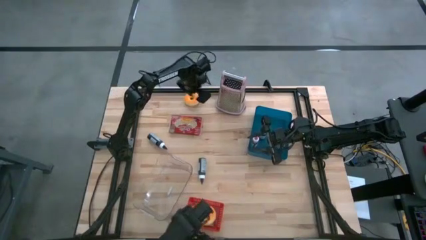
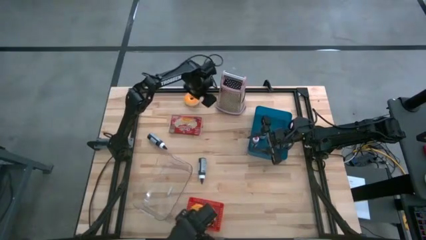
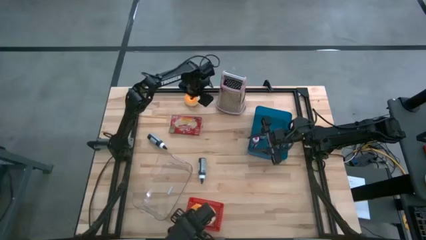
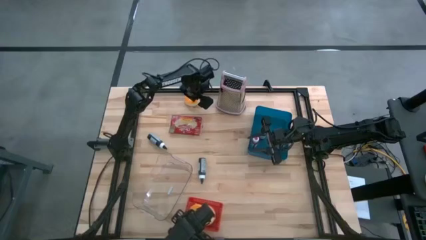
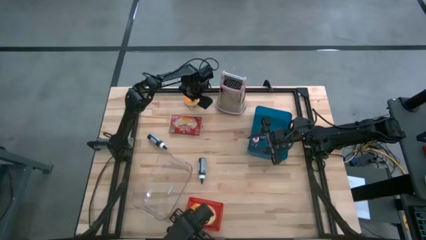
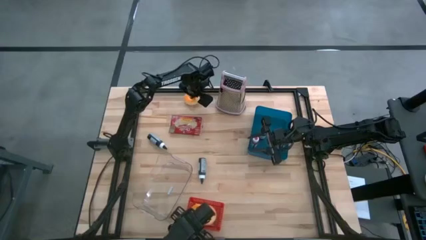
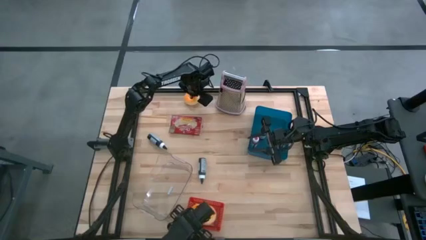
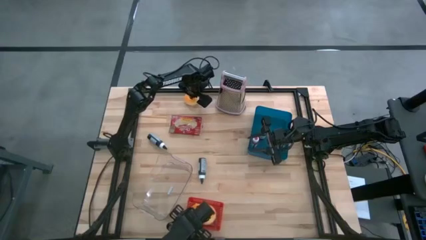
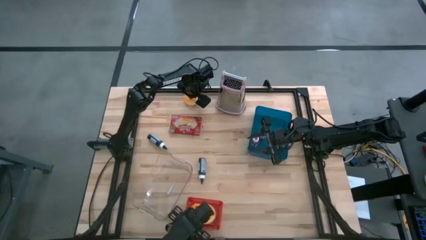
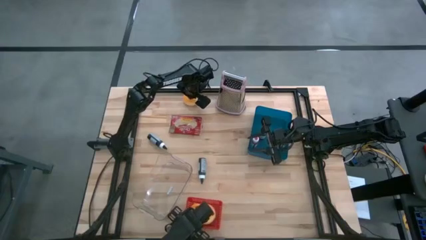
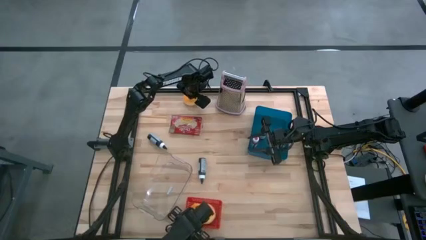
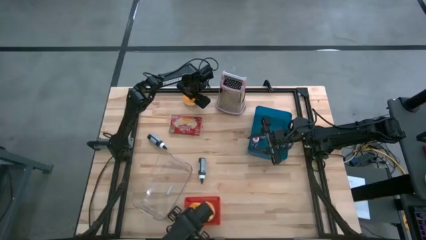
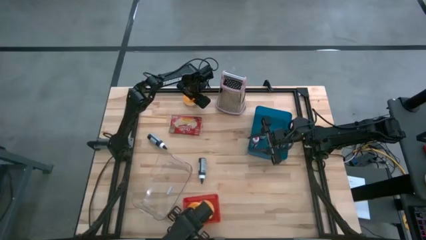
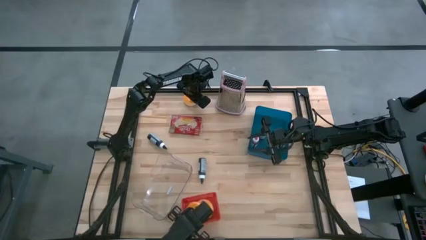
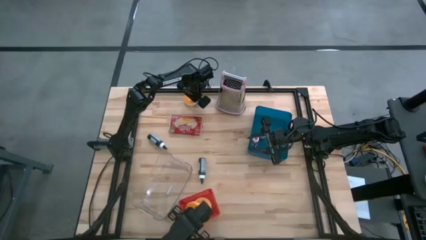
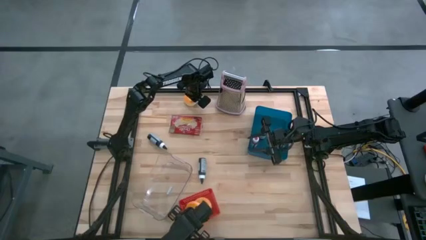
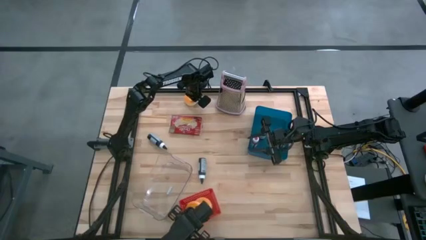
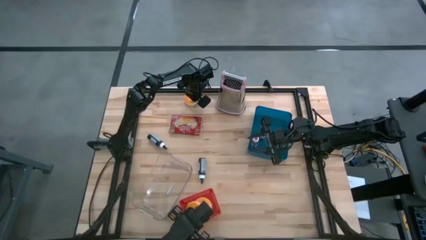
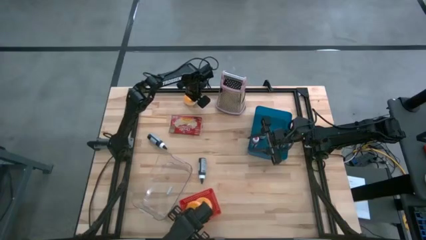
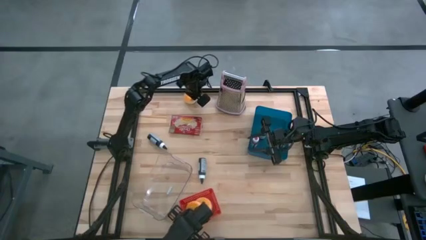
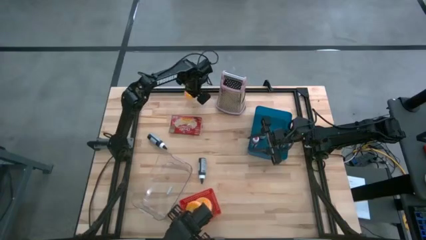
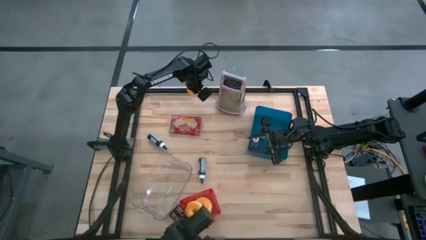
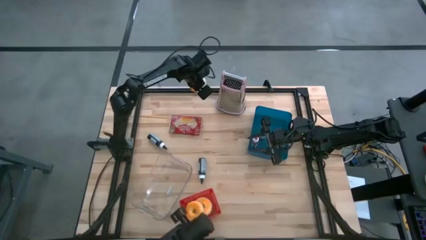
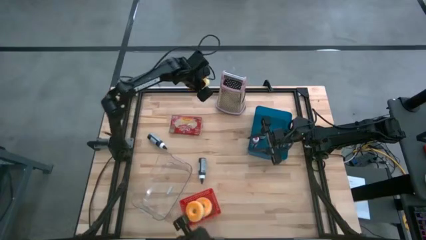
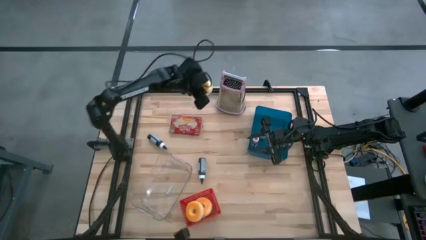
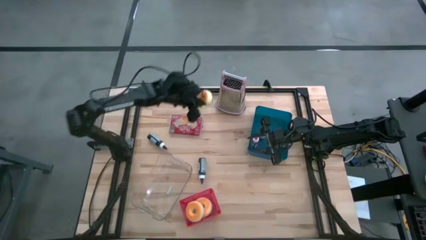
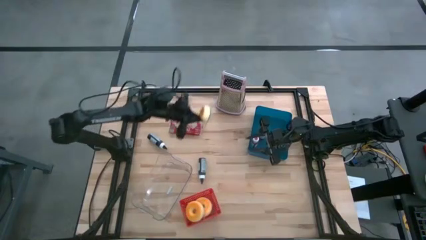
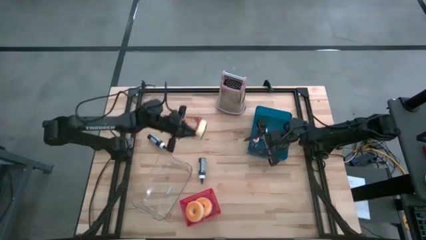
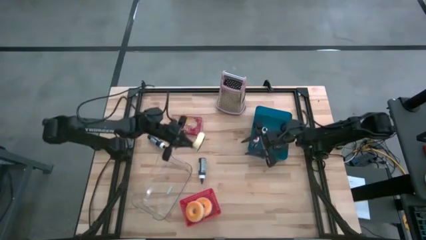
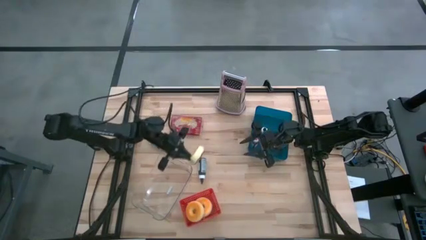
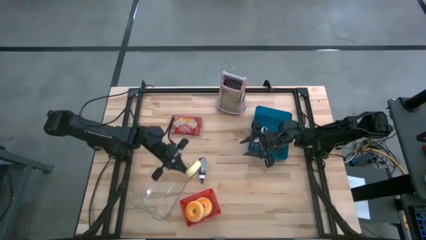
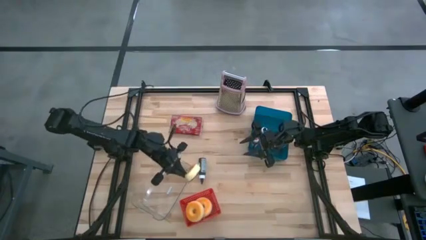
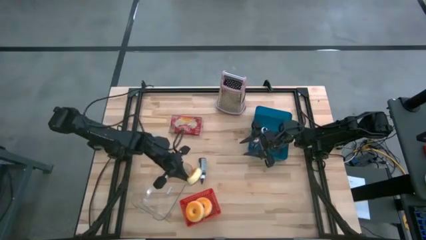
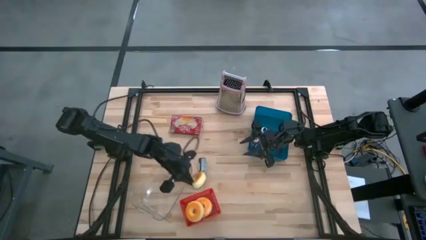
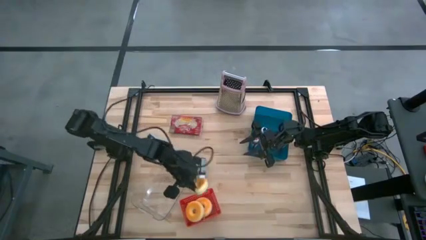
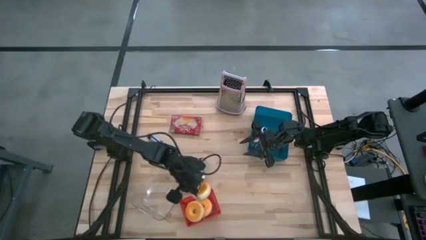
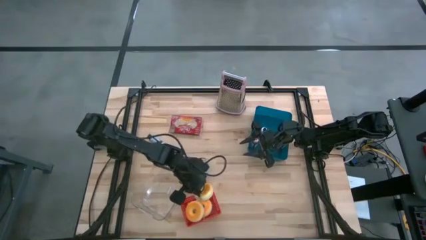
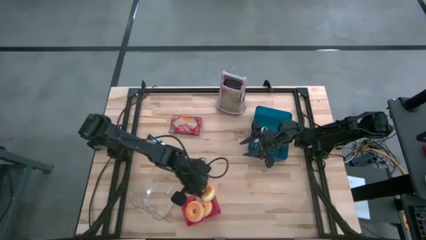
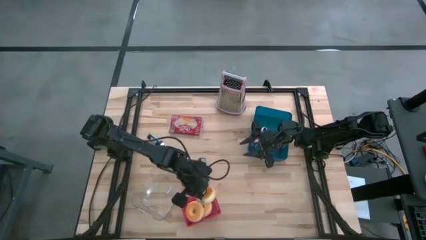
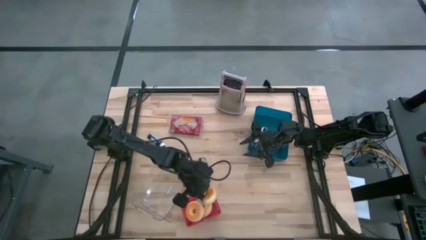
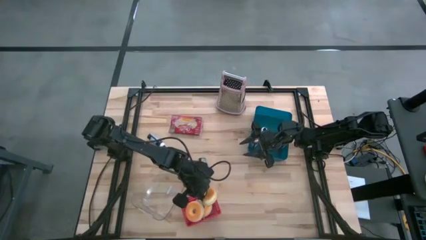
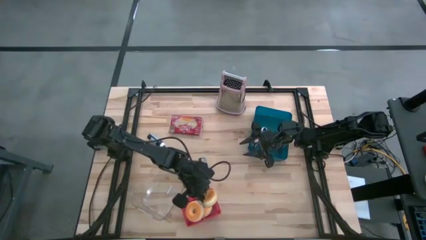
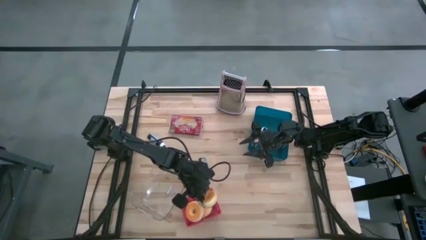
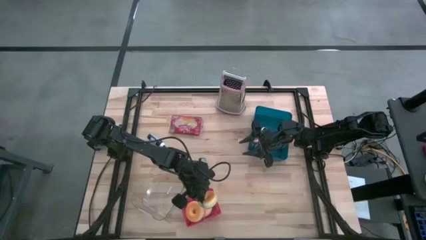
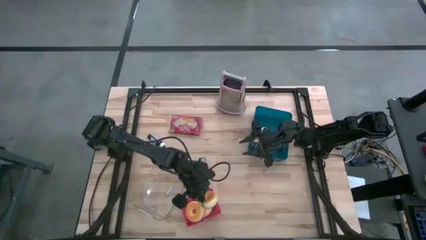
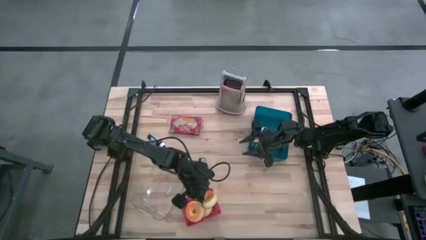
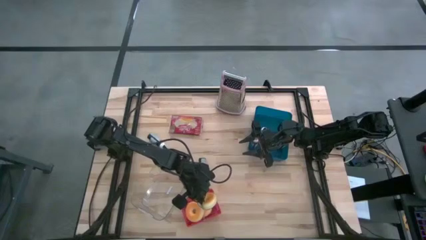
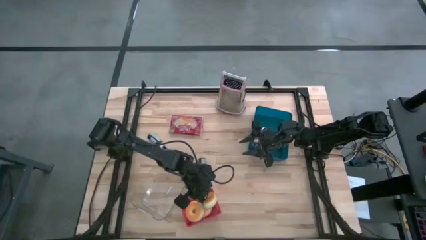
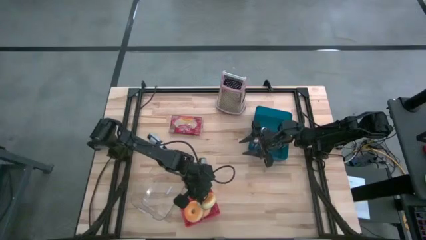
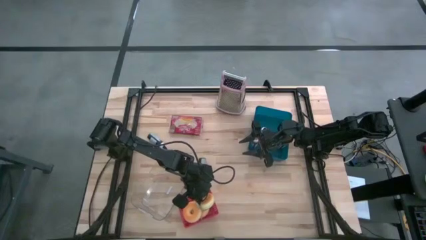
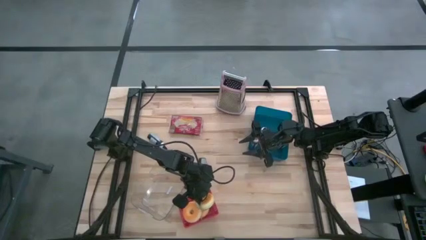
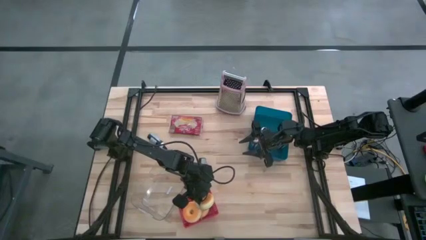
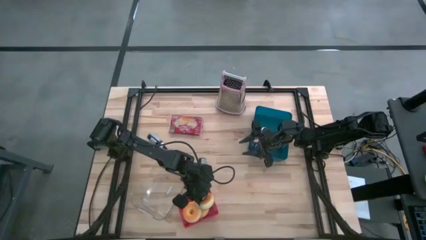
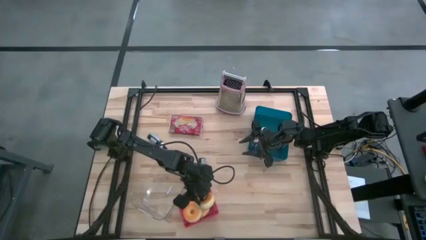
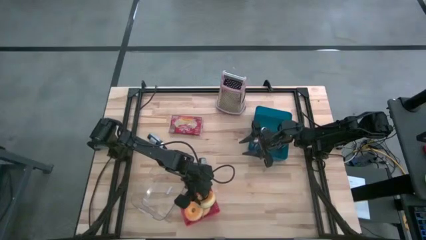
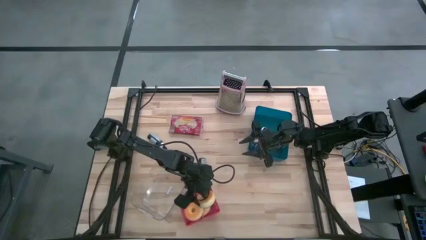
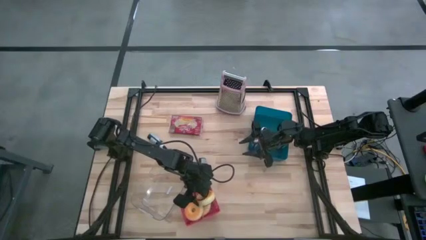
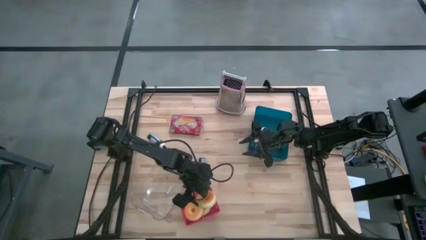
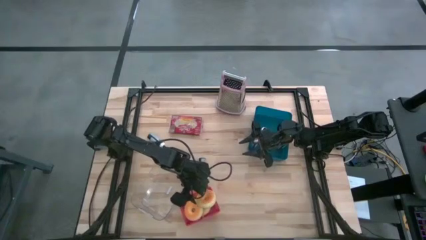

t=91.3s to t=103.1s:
Task: Pick & Place Food Item
Put the orange donut into the red bin

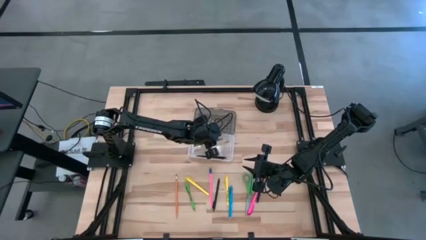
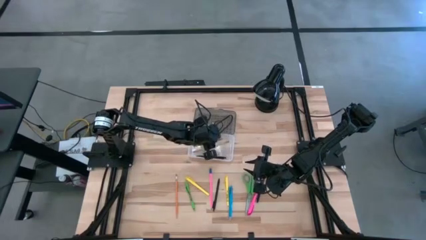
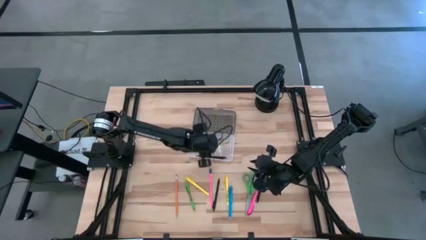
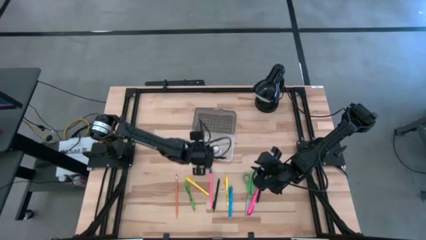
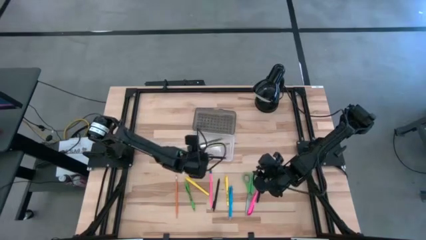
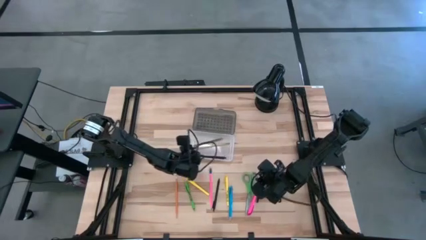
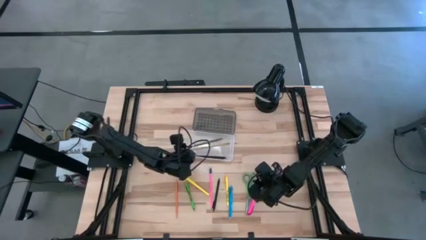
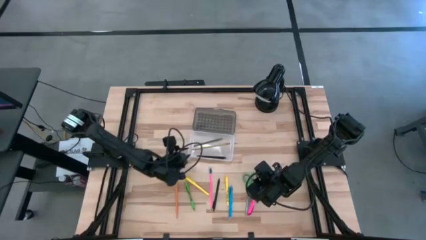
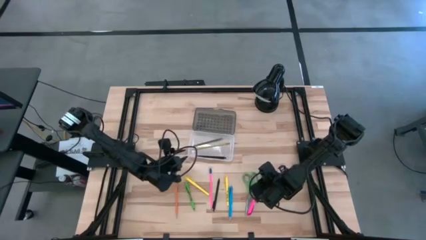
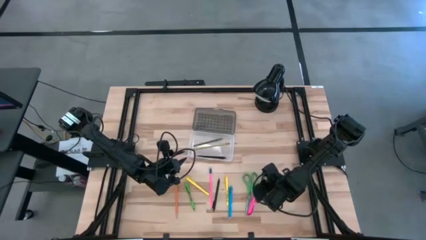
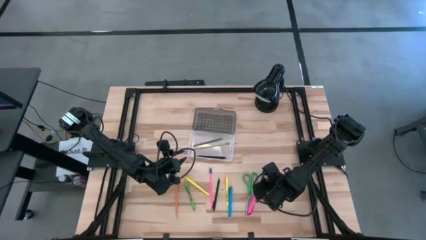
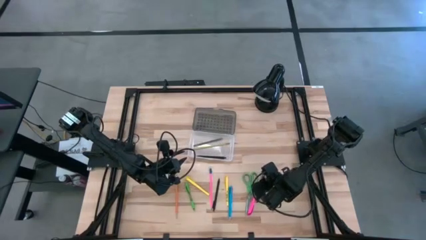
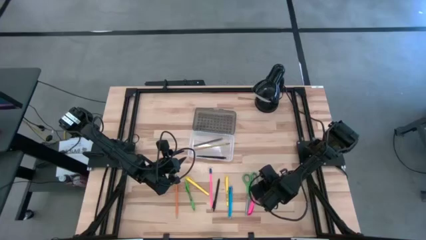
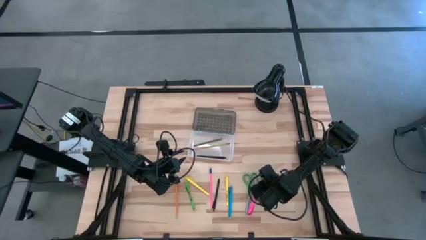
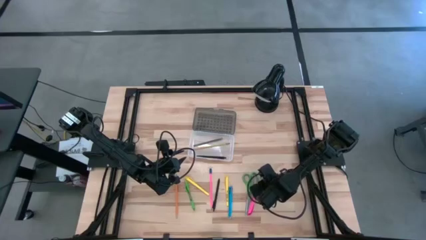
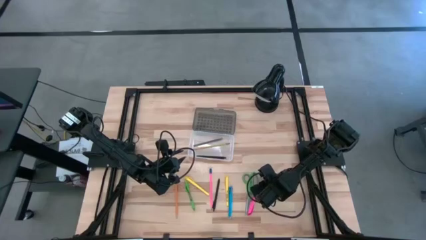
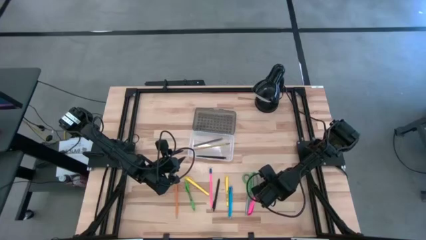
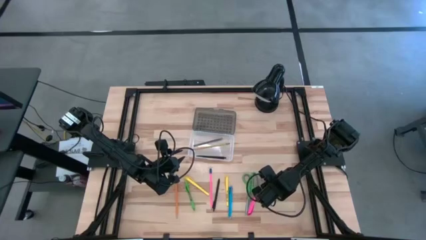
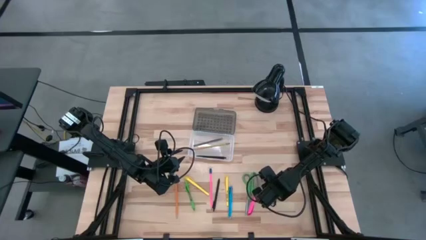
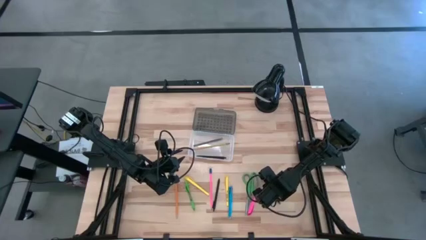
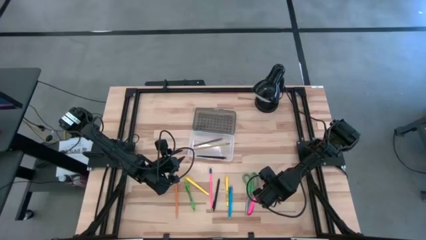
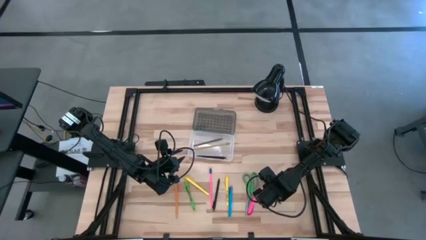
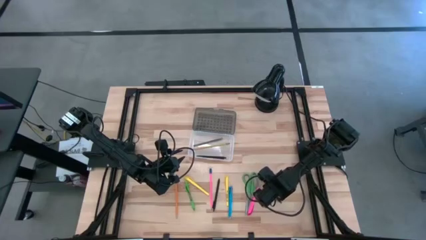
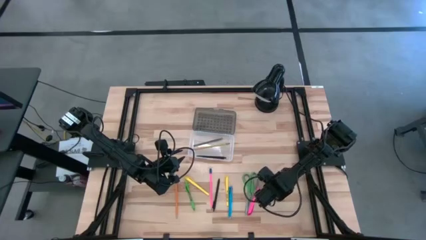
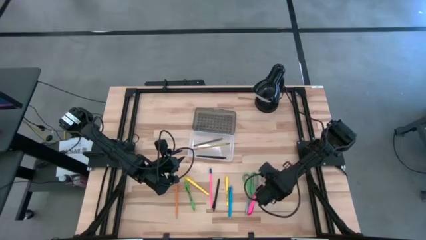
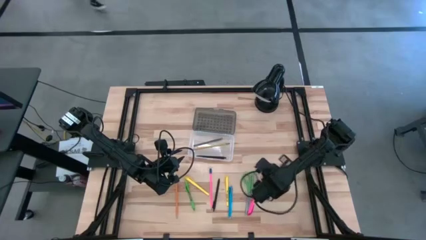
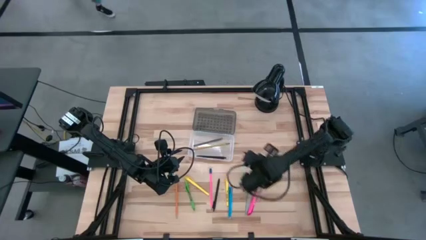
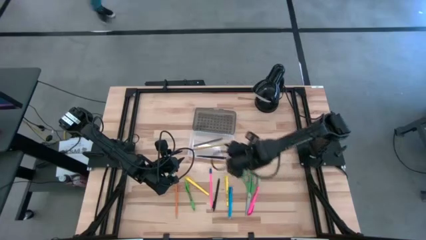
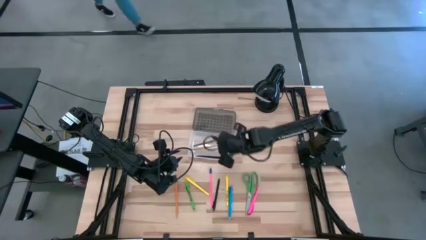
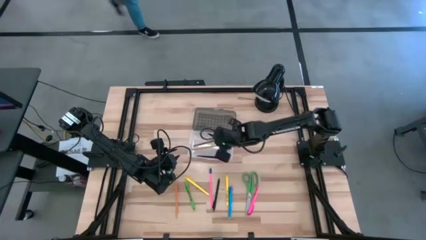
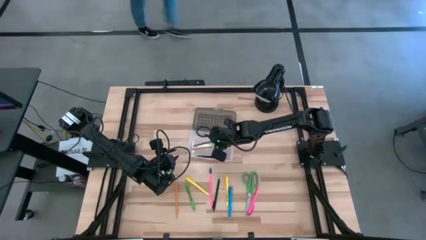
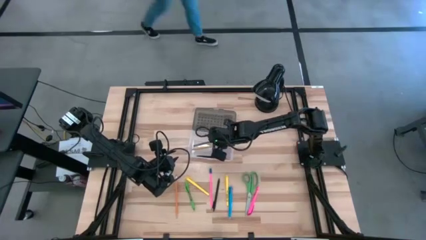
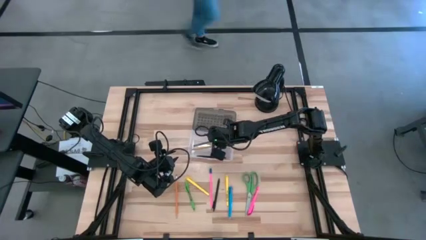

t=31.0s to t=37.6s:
Task: Pick & place school supplies into a supply box
Put the right black pen into the transparent supply box
